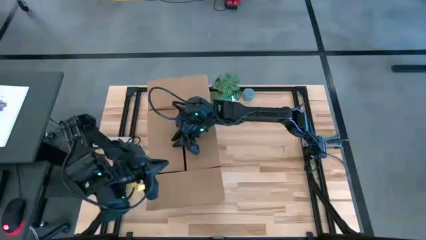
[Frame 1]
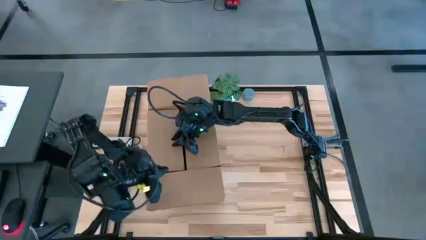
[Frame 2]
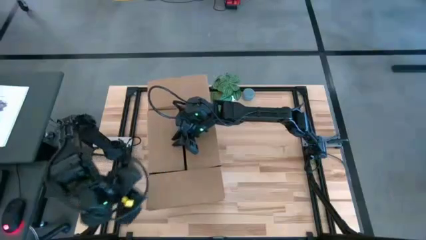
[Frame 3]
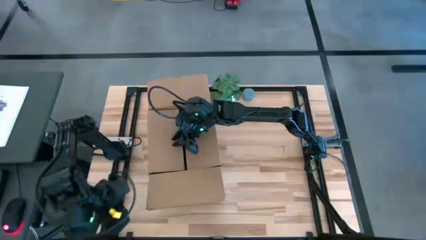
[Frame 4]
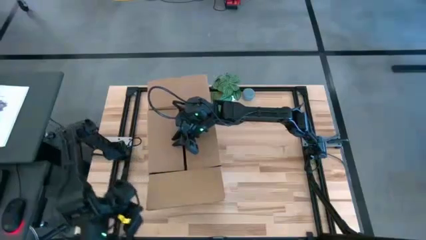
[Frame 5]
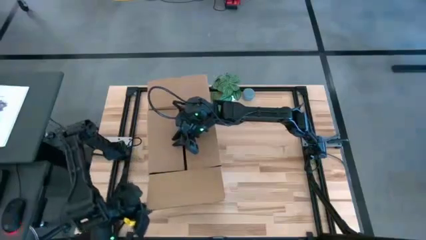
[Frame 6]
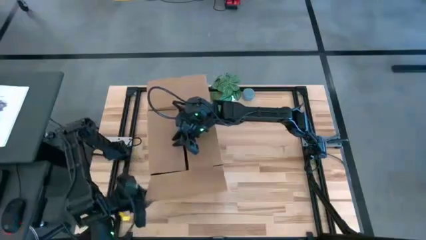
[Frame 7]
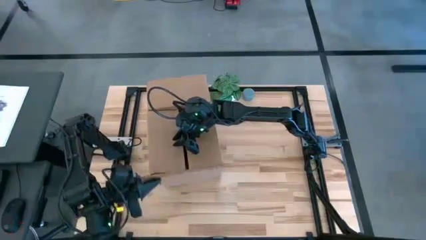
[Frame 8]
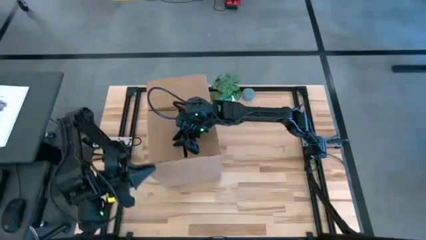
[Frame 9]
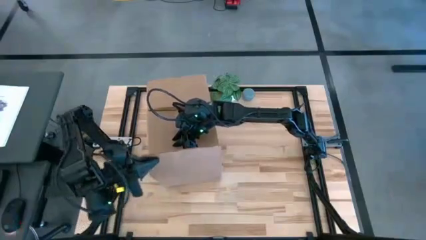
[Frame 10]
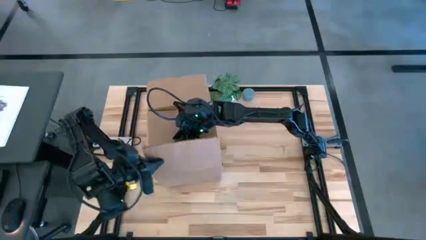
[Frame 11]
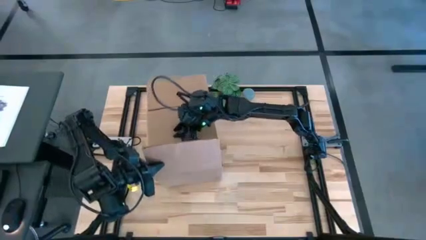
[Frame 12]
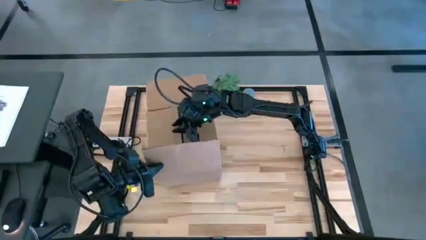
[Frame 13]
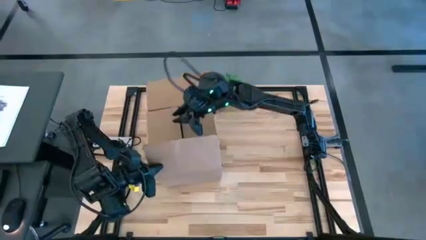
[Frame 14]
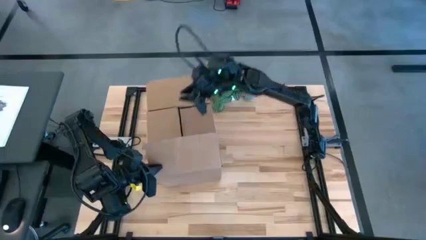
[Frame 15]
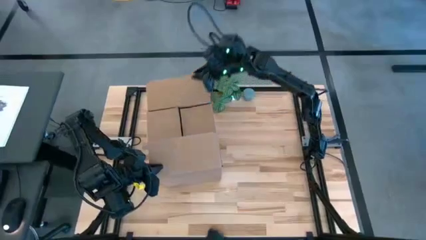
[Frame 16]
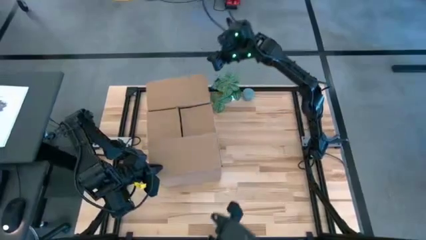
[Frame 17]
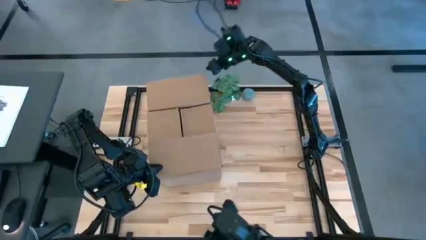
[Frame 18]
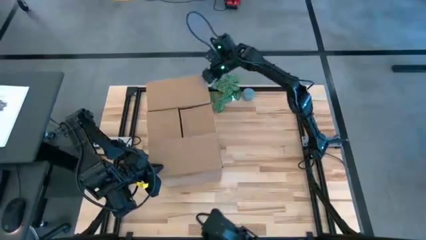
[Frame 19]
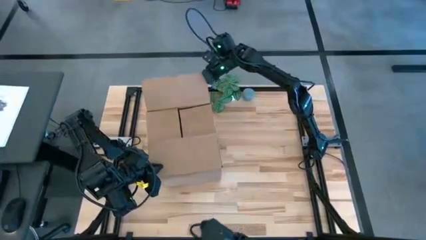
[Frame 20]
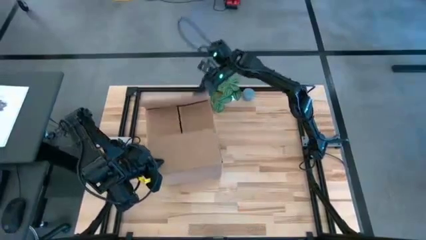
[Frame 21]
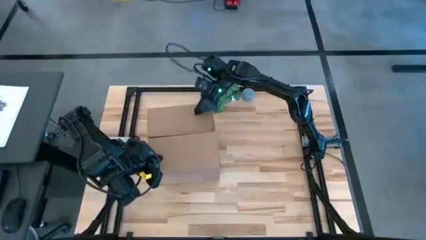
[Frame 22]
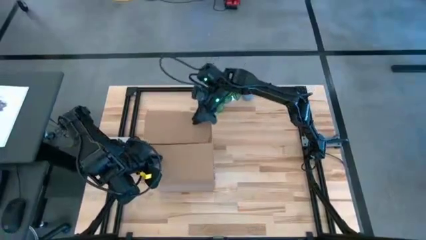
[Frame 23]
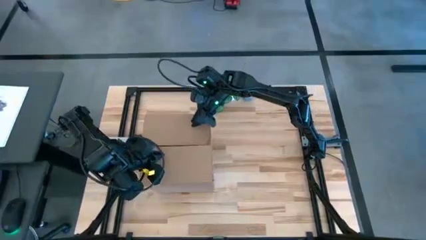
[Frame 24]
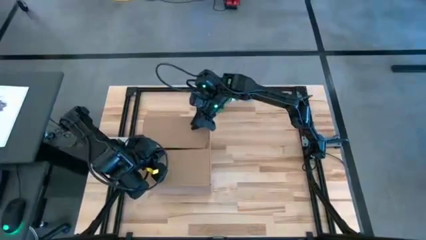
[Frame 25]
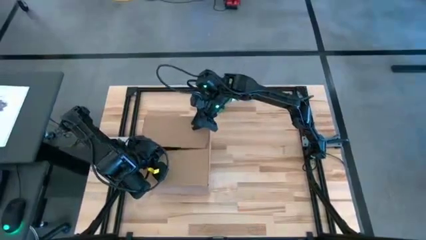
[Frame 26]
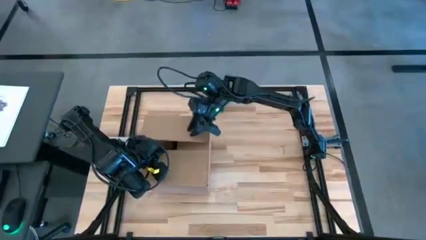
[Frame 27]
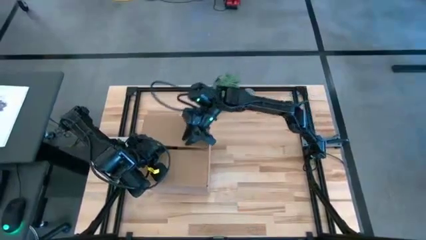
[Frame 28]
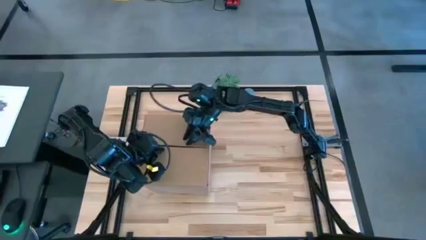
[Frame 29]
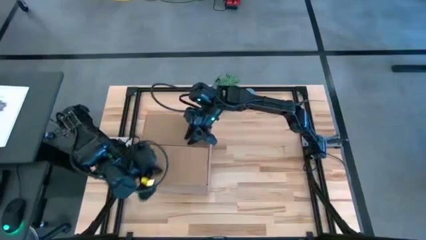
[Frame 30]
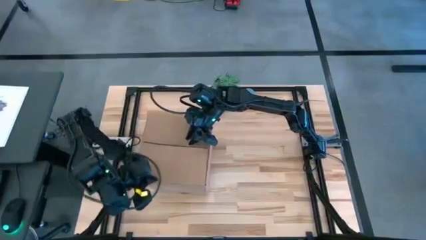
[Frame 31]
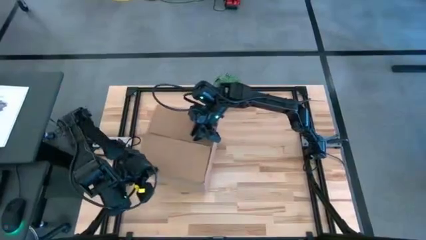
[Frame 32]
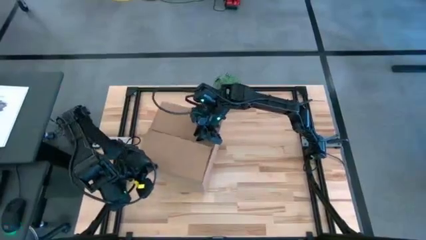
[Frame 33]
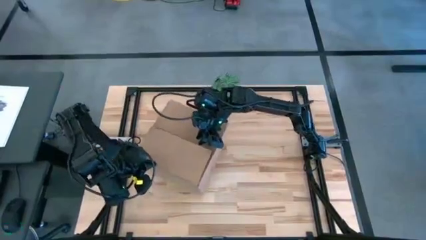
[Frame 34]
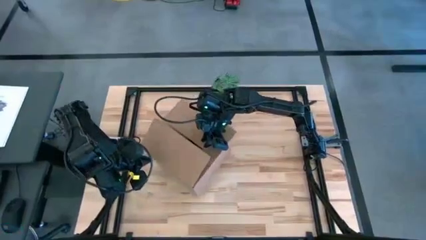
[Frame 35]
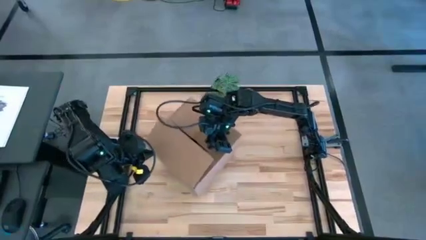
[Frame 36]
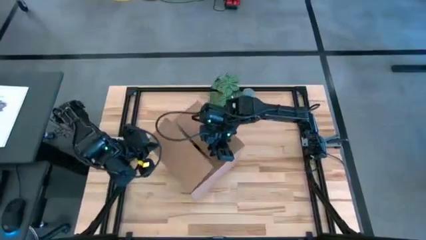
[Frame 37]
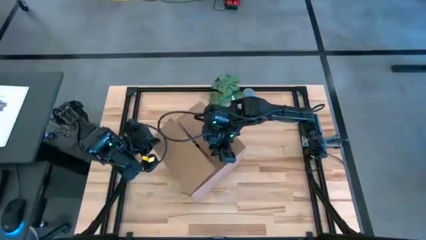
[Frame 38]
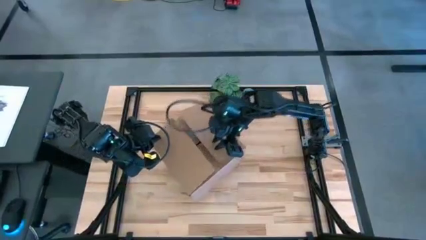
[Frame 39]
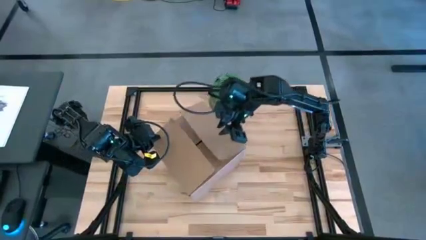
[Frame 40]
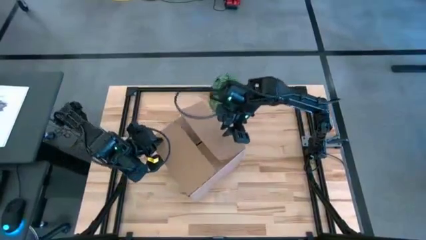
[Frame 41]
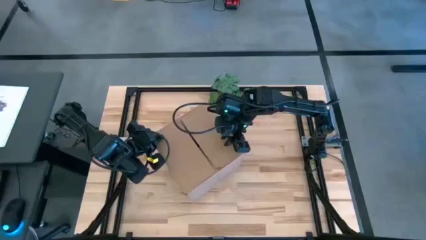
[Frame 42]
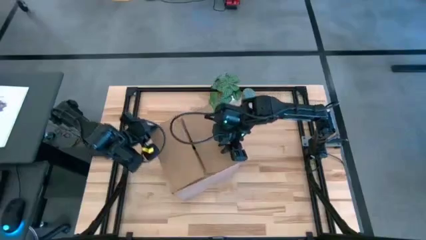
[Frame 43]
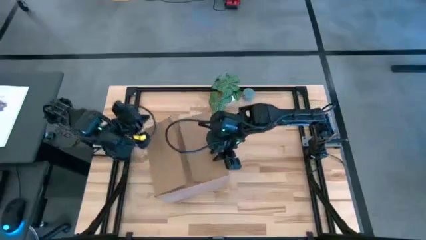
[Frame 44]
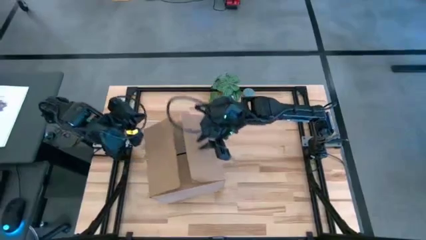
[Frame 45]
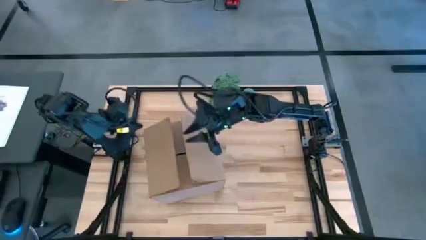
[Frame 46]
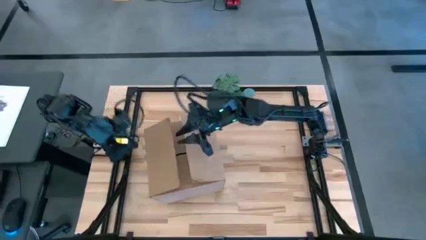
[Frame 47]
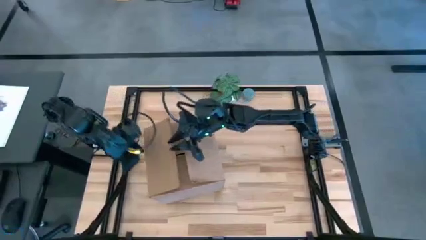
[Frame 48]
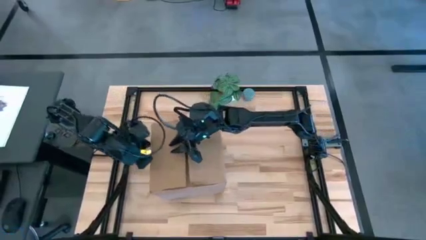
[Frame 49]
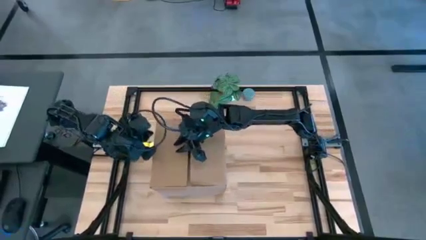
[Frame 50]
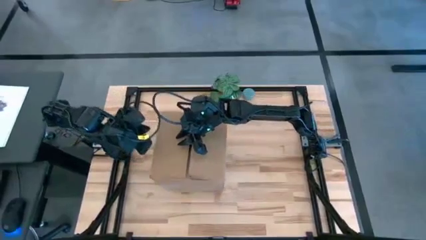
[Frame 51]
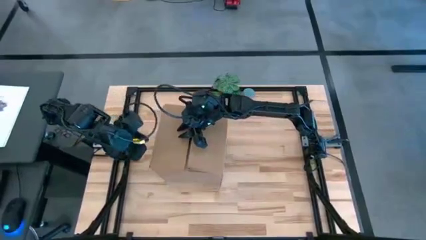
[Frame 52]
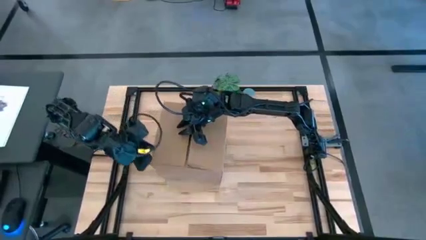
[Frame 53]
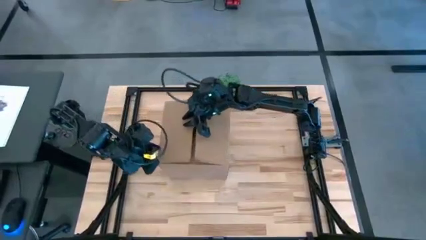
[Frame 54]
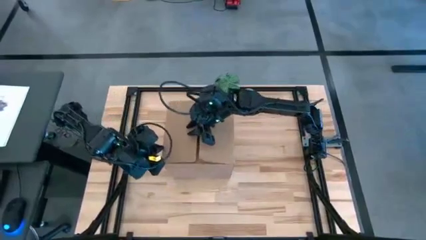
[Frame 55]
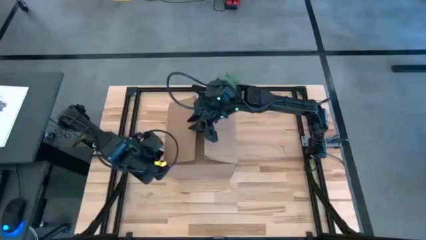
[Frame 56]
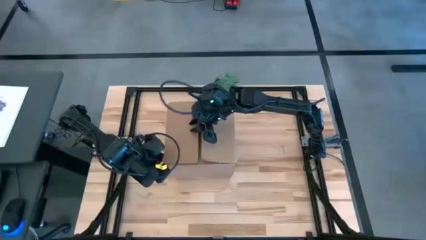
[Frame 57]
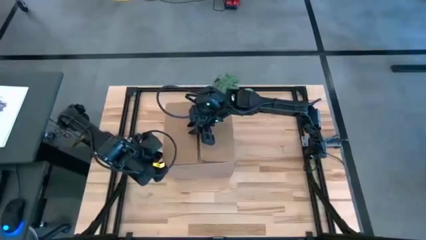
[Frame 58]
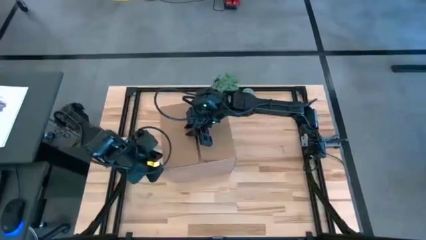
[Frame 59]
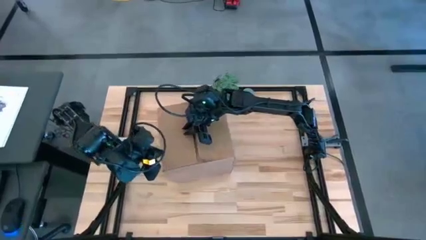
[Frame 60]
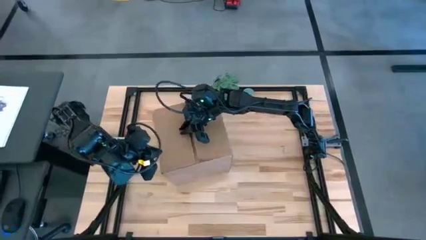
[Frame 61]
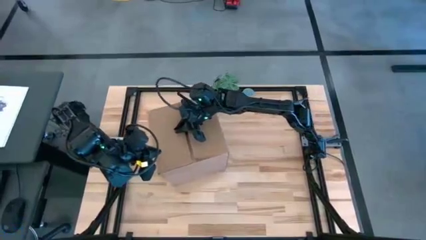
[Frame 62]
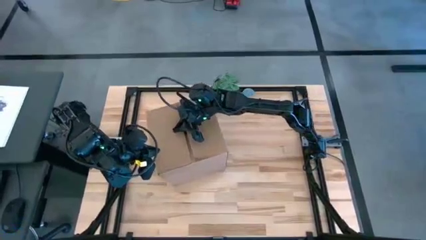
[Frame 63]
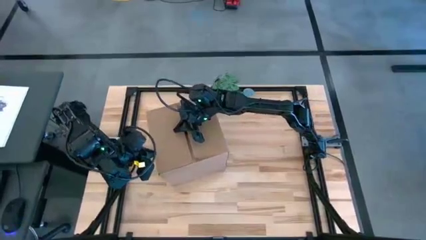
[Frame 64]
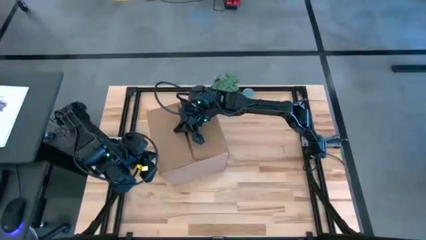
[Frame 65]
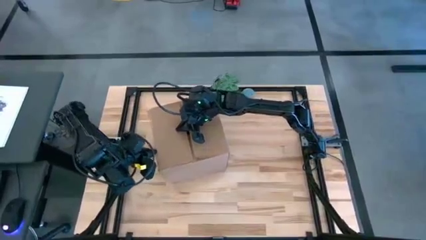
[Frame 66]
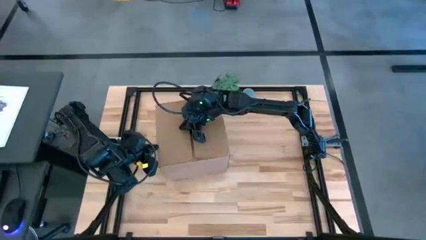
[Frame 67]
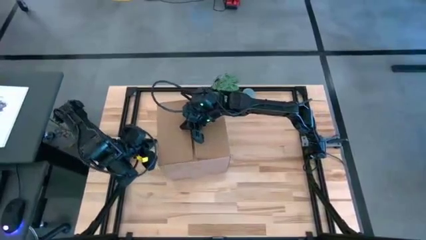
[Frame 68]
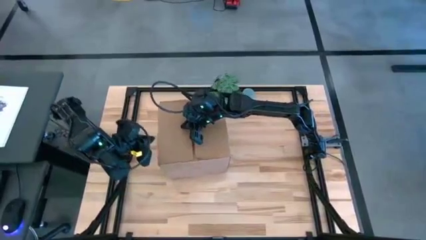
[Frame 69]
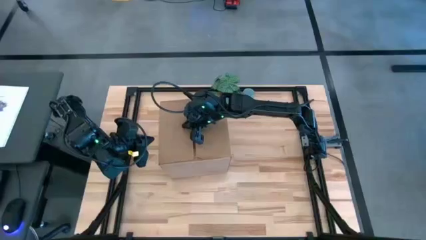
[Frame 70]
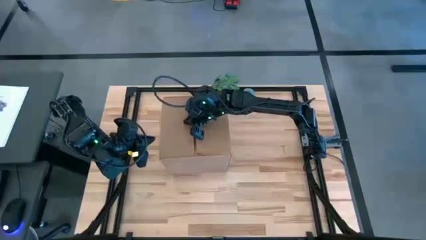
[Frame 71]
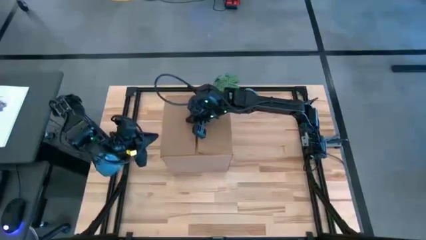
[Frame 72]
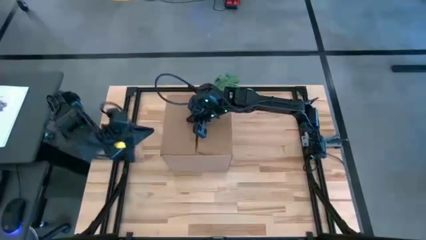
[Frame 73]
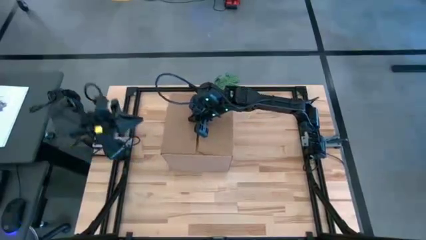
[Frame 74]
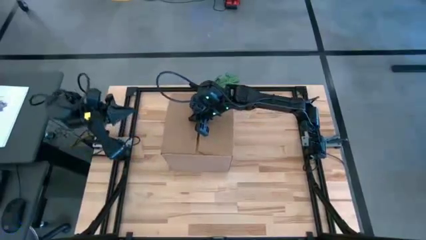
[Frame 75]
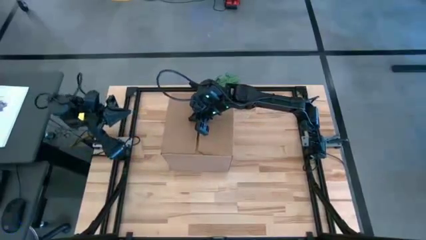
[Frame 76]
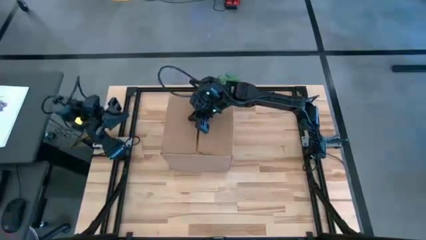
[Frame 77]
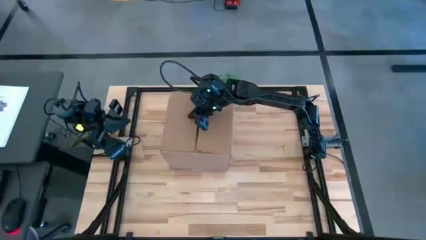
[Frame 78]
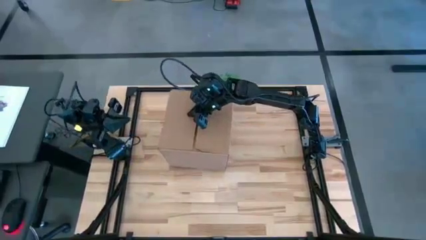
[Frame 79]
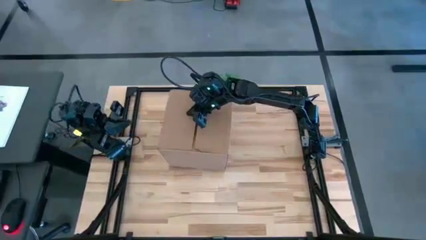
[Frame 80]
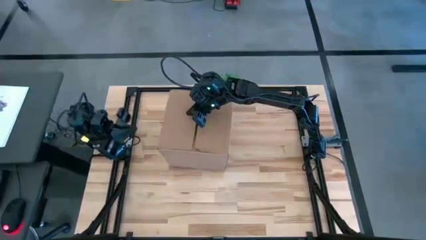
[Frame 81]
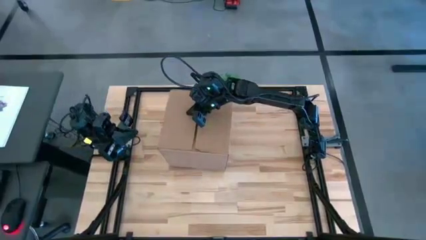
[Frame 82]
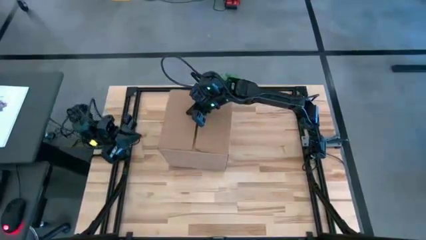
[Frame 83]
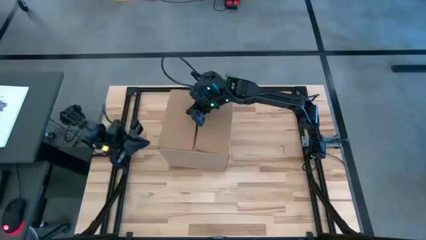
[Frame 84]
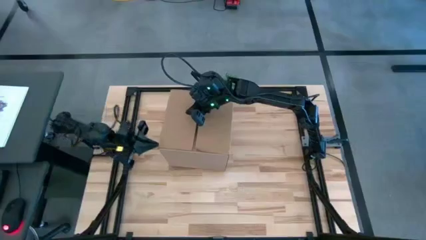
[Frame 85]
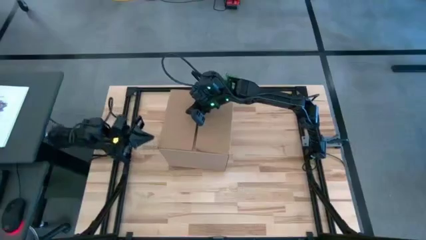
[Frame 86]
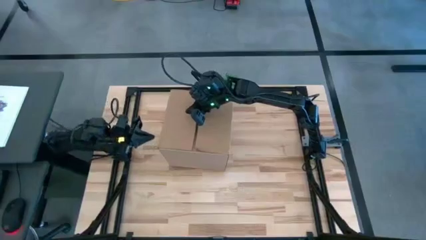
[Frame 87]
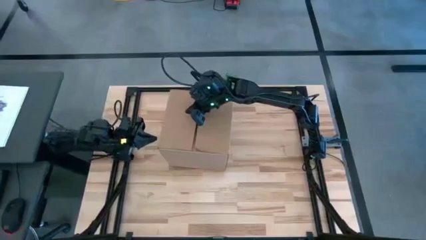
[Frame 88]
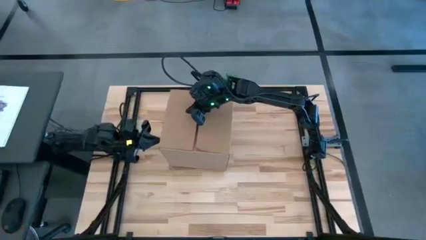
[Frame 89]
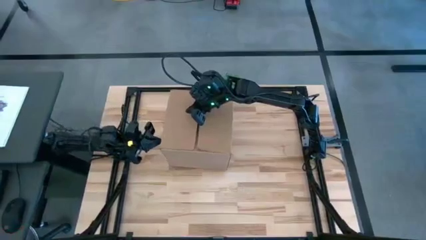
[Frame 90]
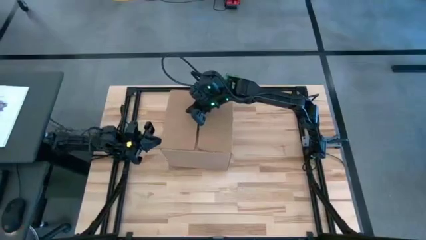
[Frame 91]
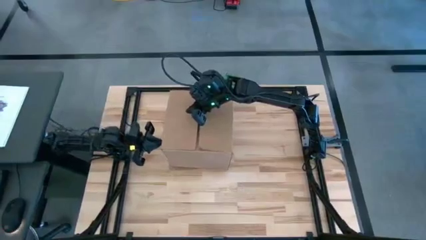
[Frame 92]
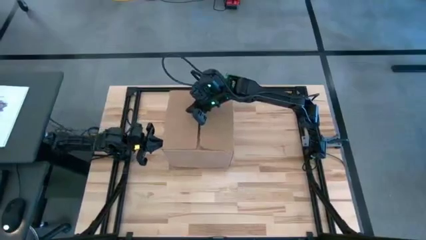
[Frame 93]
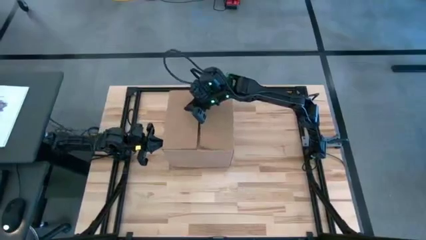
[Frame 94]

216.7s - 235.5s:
Task: wrap mug
Close the box
